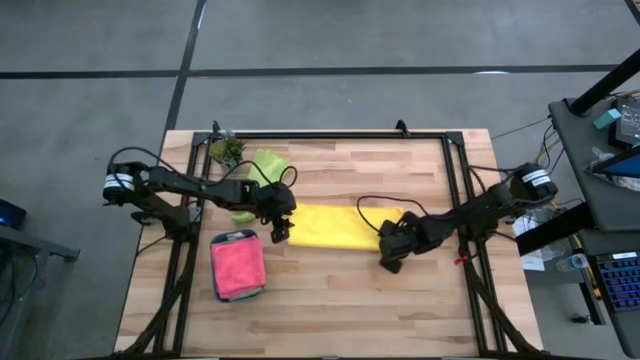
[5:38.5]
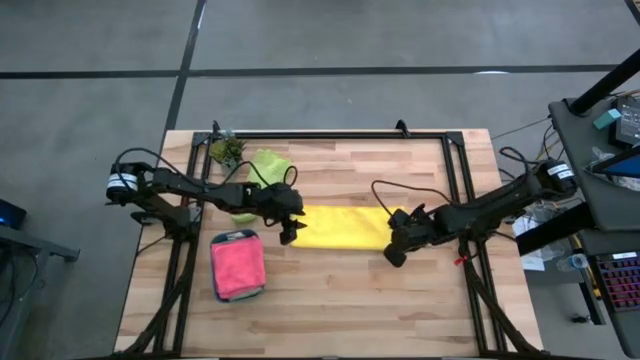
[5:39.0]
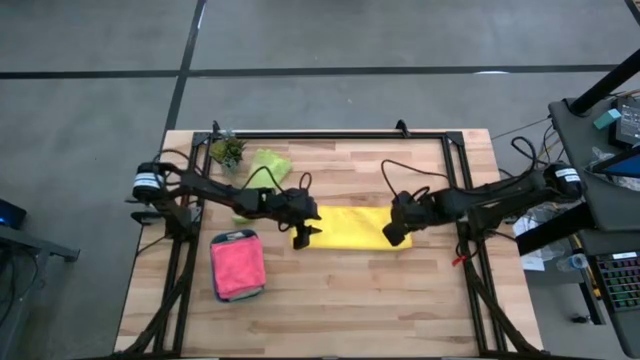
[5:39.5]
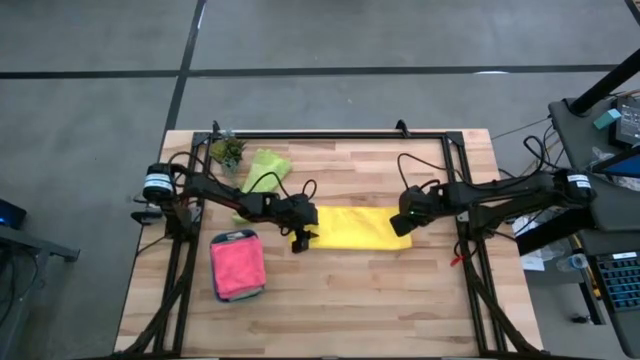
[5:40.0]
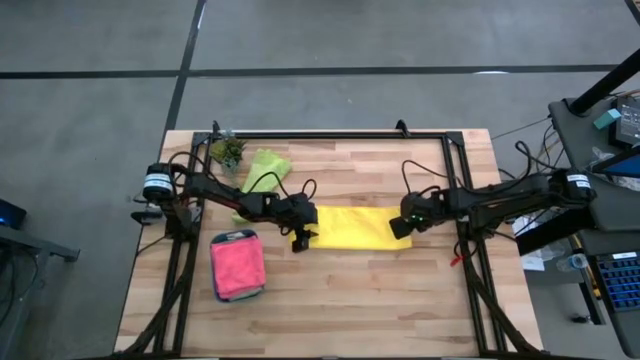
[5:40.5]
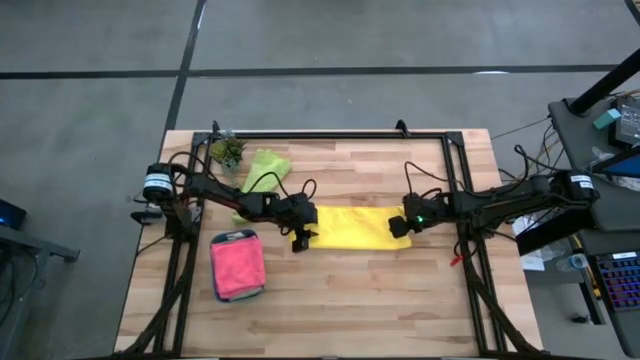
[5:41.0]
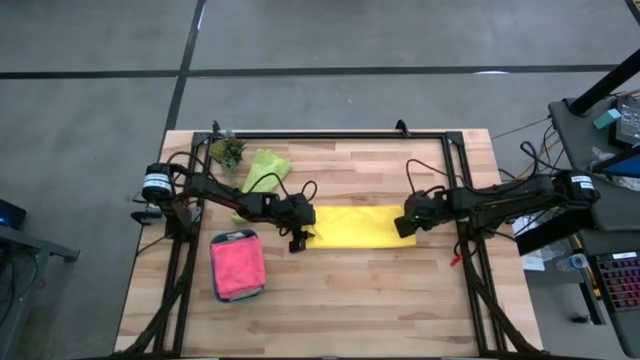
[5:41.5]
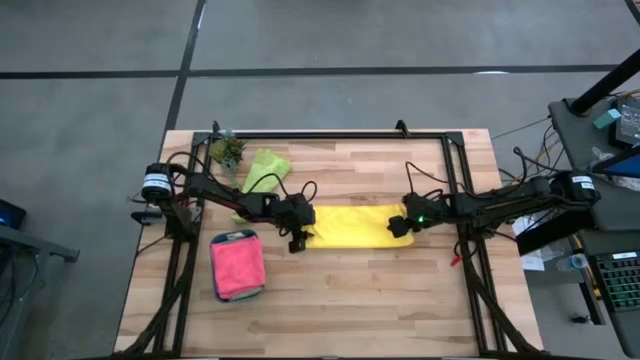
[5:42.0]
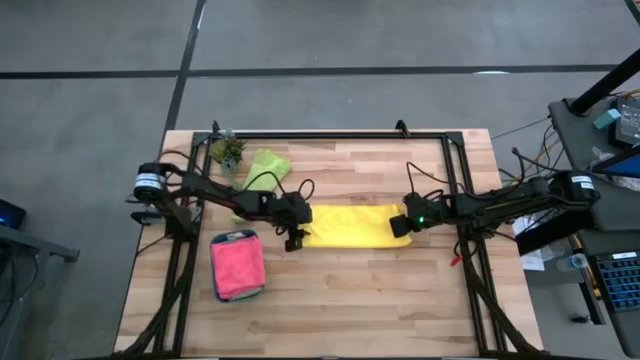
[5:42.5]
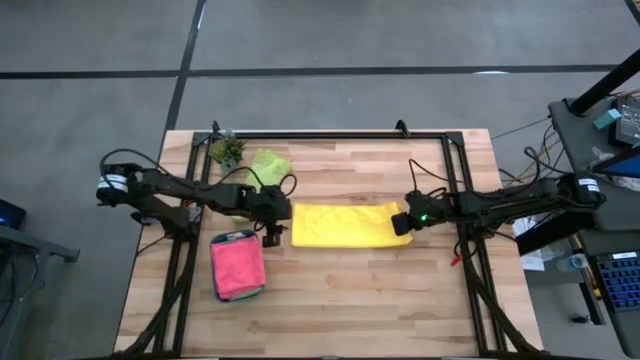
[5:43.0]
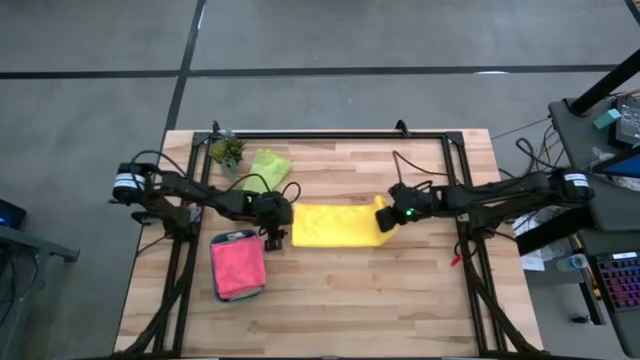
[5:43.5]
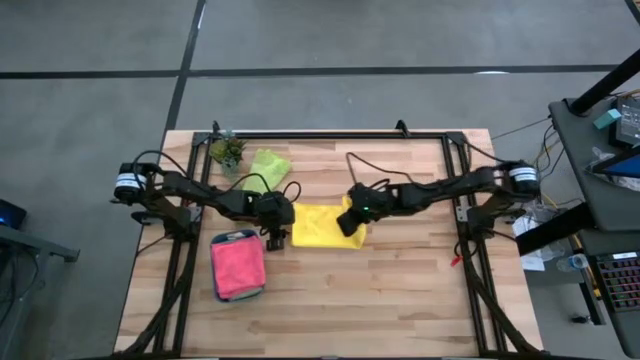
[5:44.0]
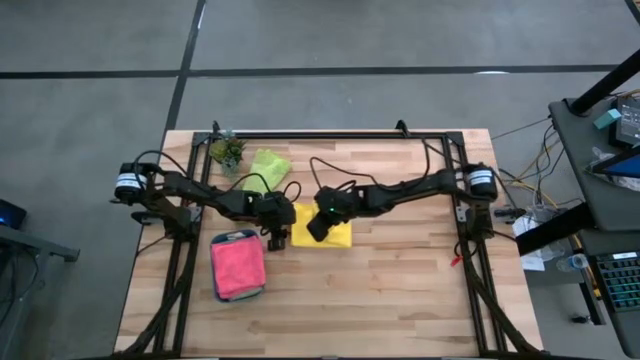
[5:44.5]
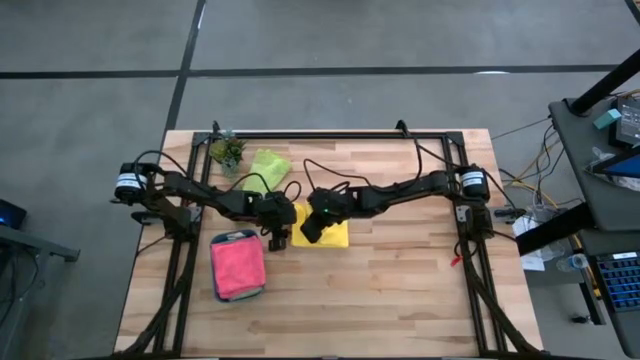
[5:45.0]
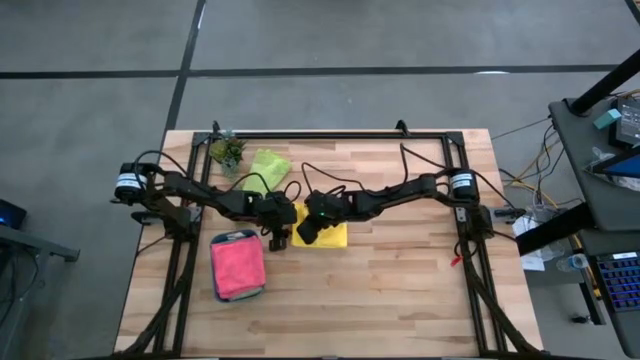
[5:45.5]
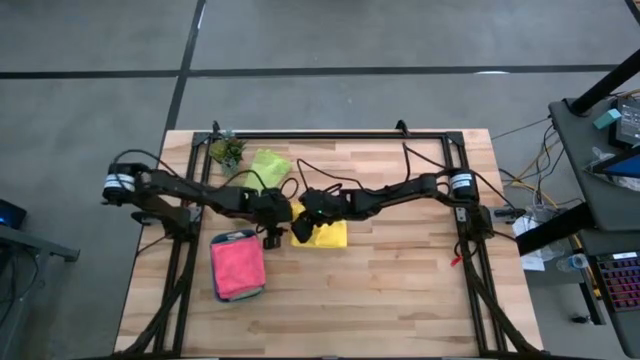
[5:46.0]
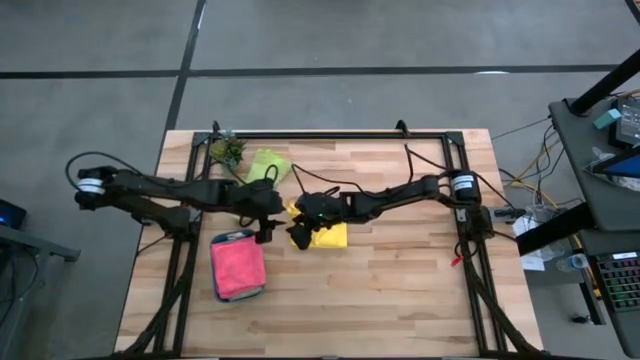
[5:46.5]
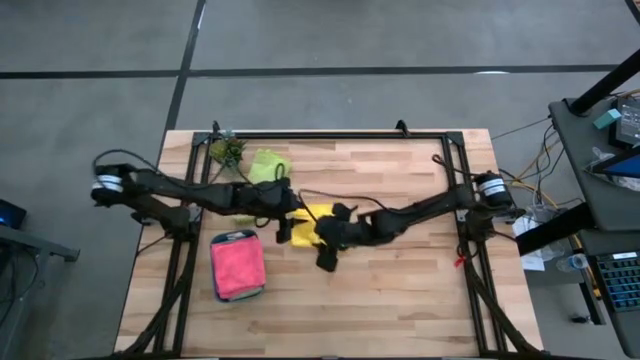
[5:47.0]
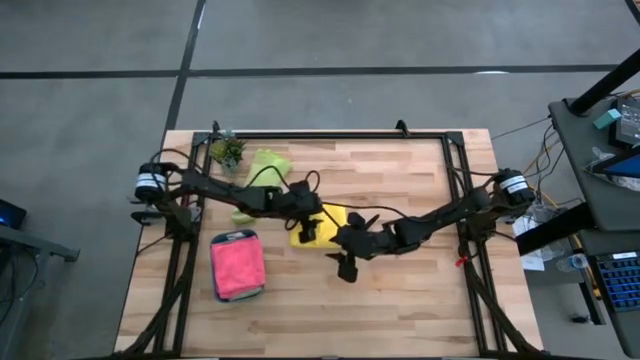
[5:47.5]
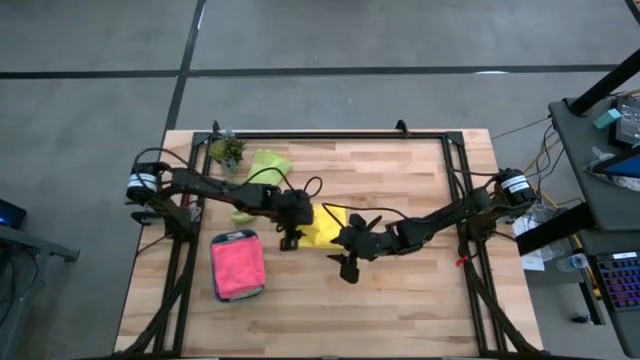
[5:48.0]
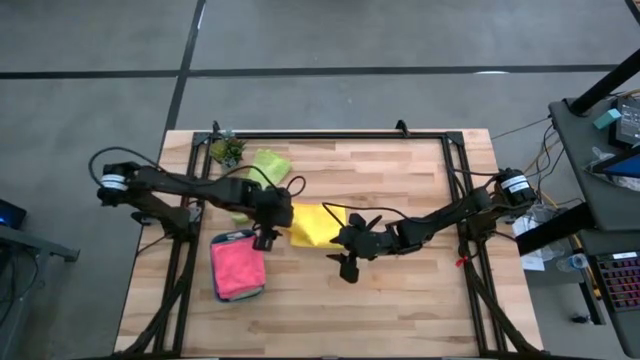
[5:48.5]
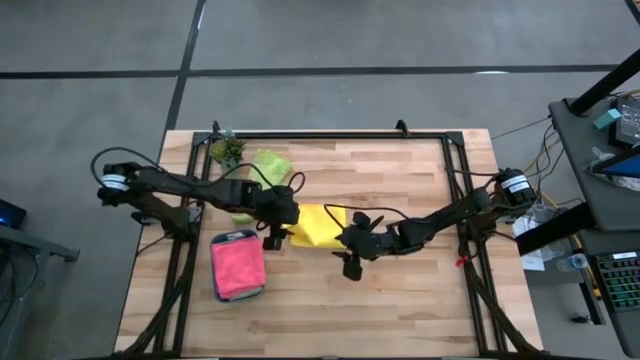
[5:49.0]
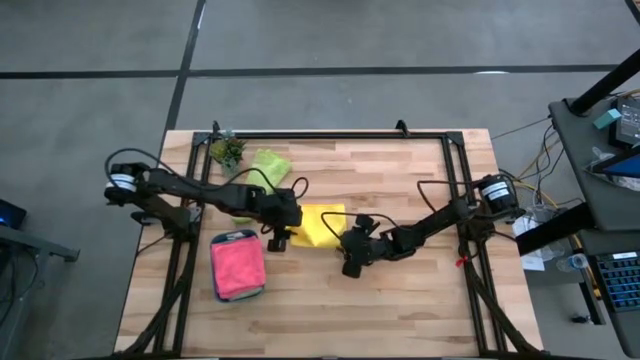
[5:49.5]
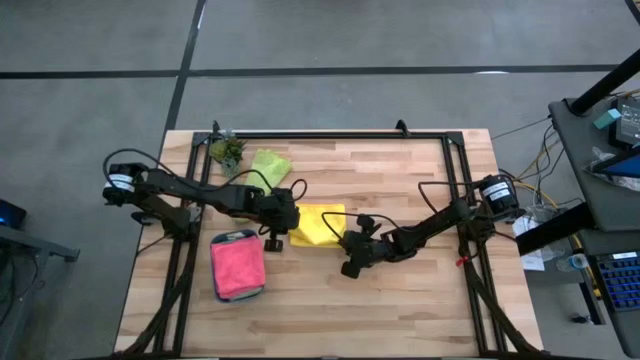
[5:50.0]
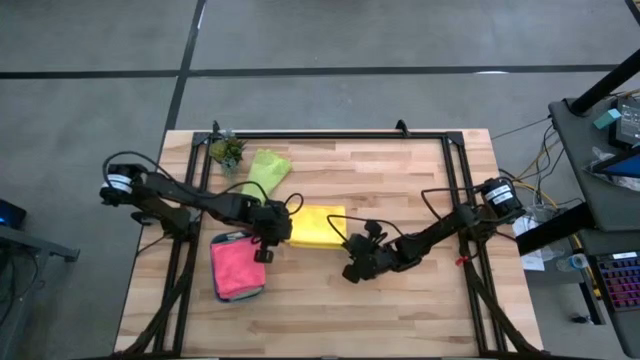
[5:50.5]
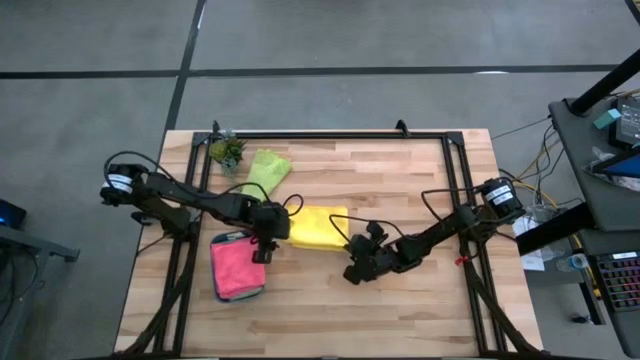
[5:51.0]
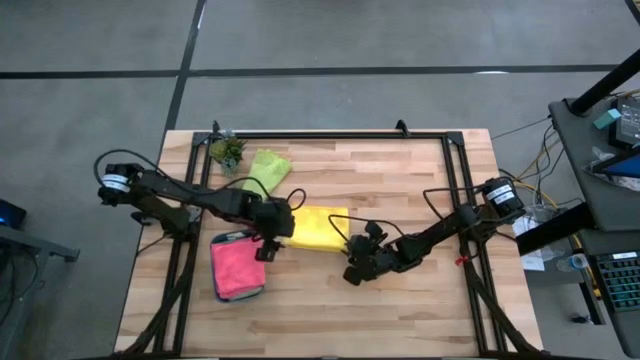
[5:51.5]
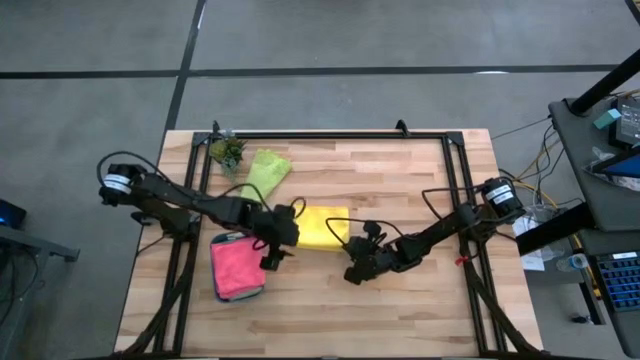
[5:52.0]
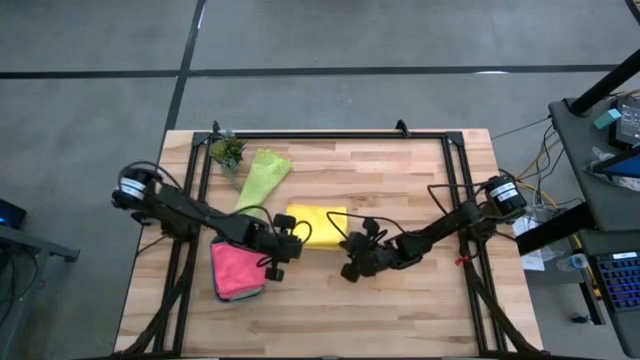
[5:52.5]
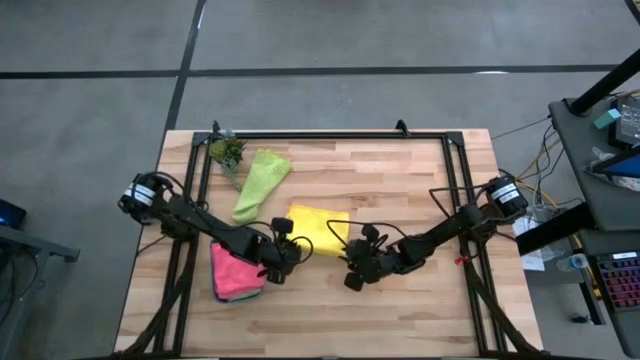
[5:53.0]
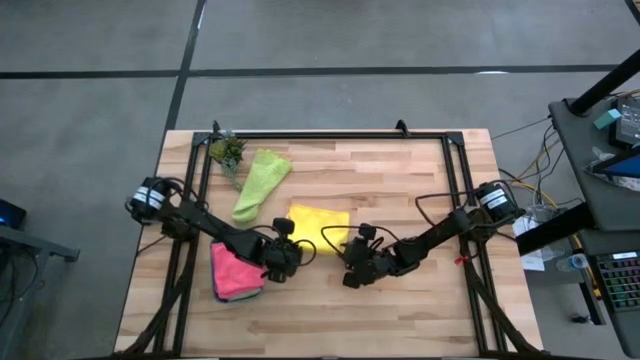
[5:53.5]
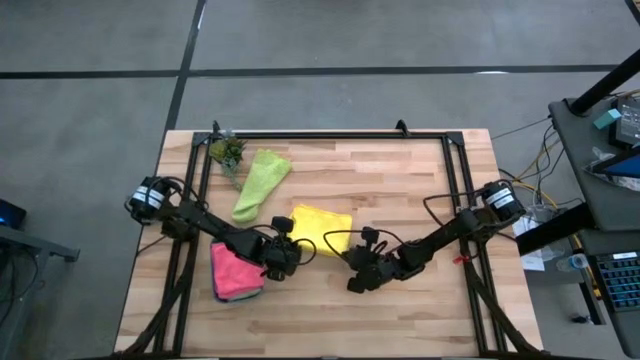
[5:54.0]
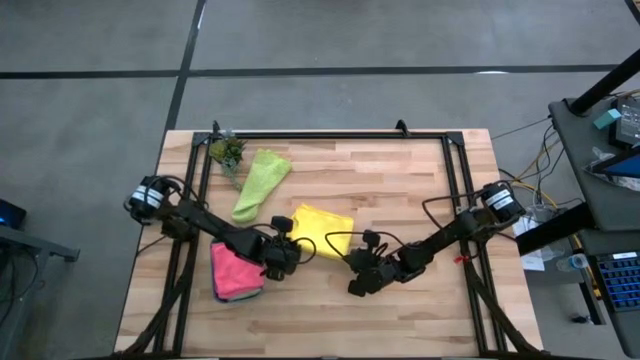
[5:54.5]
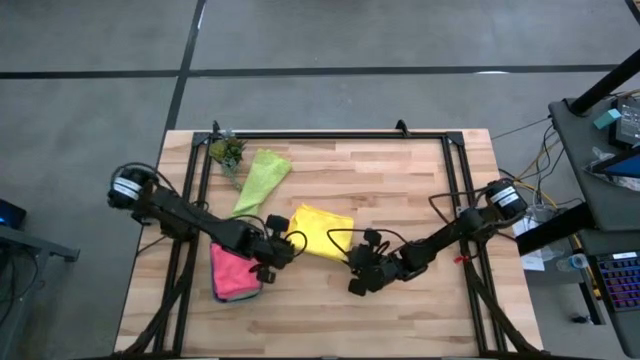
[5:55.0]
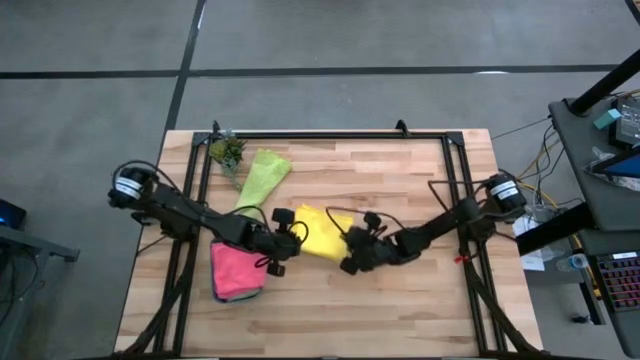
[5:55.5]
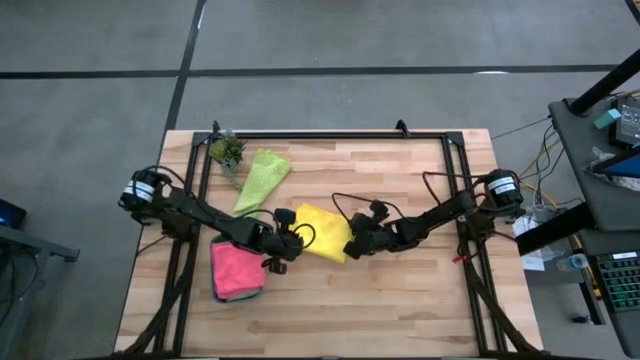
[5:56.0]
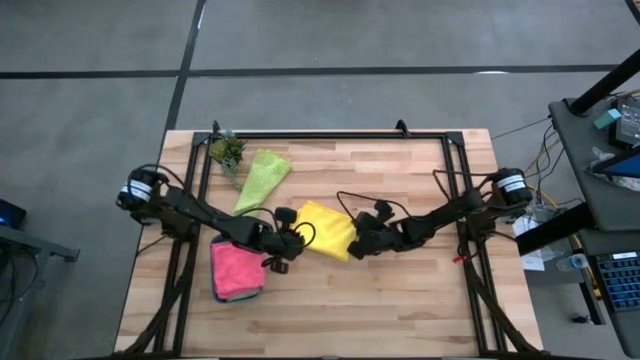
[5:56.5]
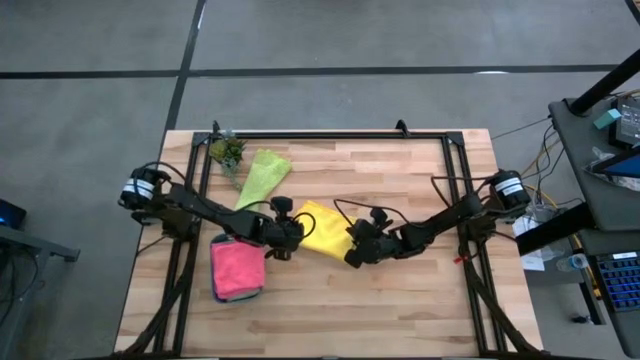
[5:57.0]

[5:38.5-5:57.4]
Task: Fold microfiber towels
Fold the yellow microfiber cloth

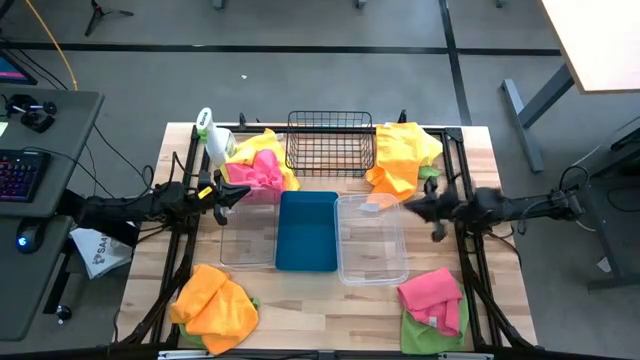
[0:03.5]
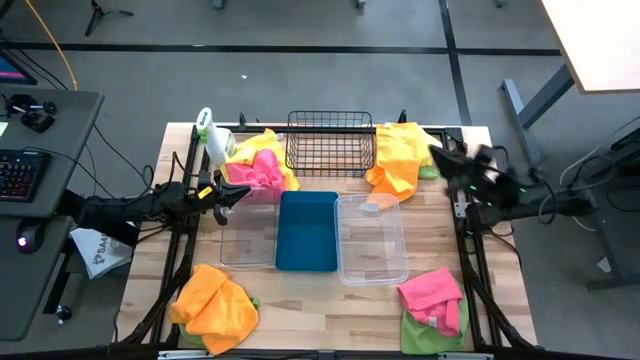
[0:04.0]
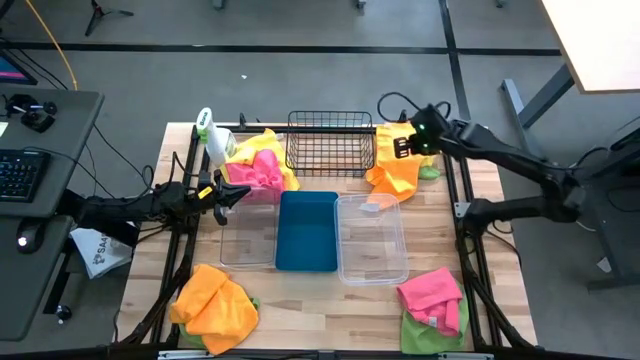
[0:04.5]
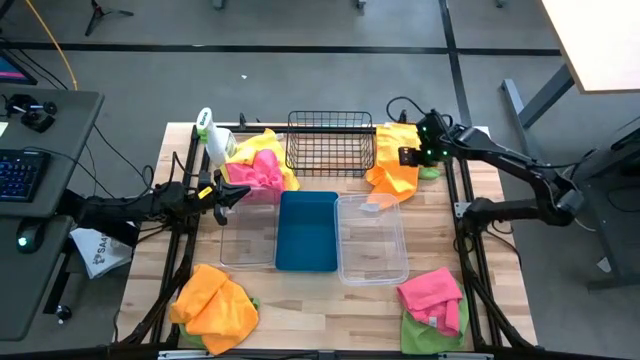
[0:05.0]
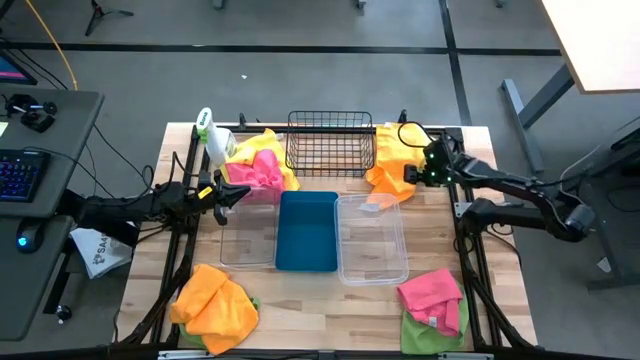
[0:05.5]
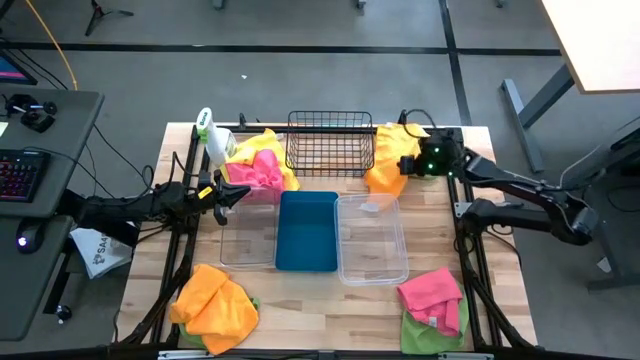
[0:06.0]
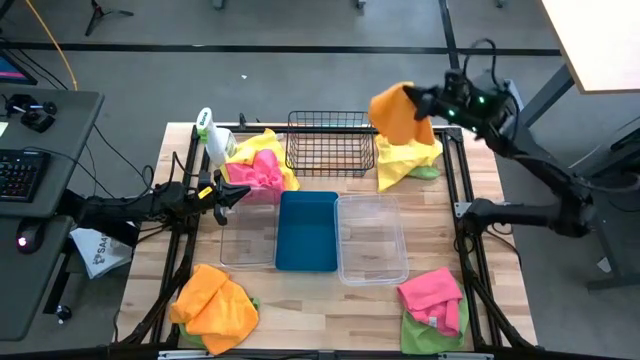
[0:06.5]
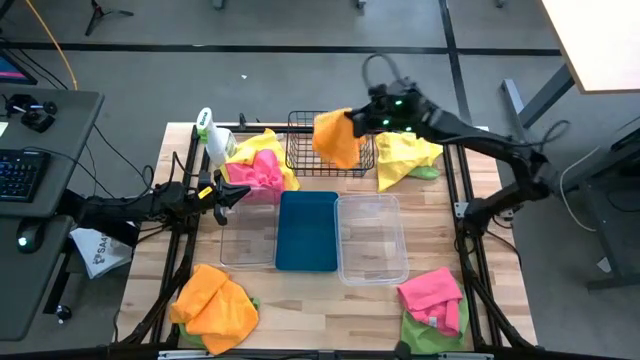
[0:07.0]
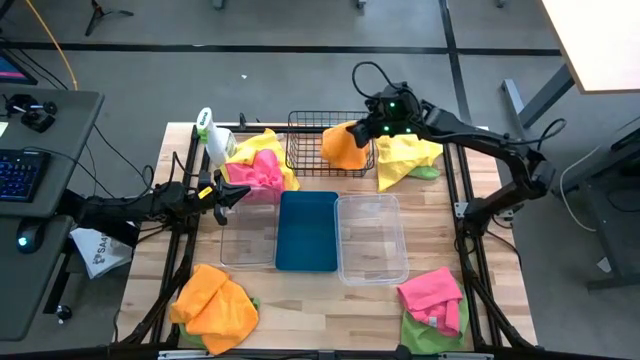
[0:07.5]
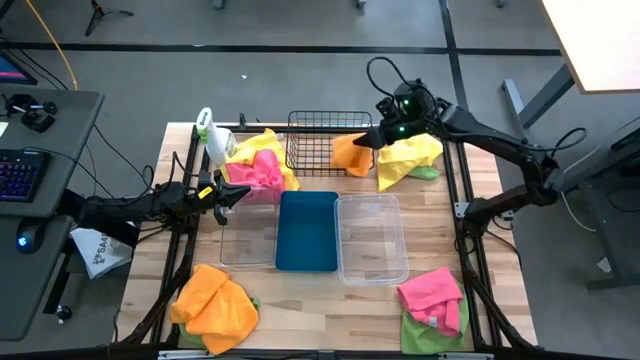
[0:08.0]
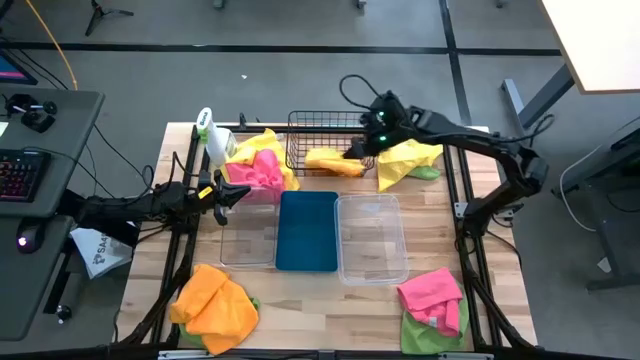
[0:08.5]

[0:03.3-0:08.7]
Task: Sort microfiber towel by color & place in baskets
Put the top orange microfiber cloth into the wire basket
